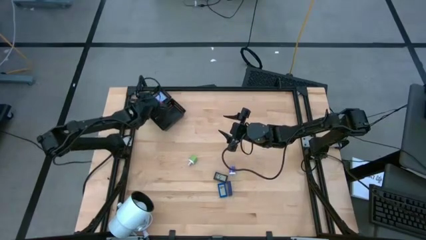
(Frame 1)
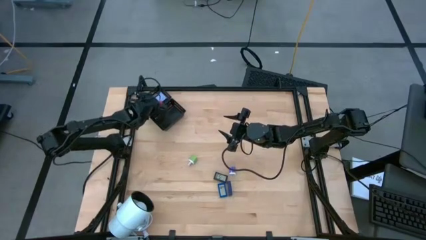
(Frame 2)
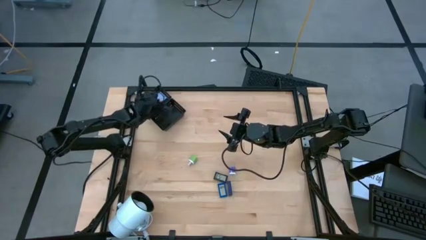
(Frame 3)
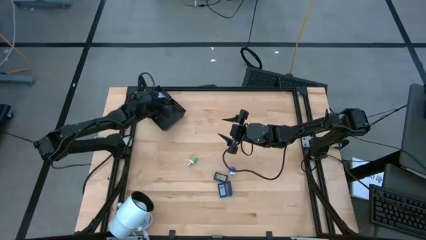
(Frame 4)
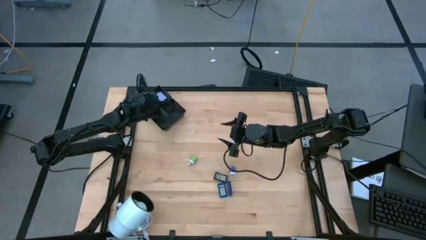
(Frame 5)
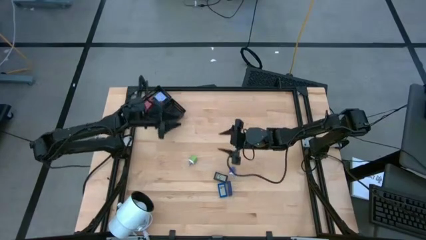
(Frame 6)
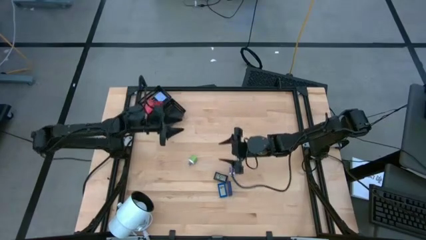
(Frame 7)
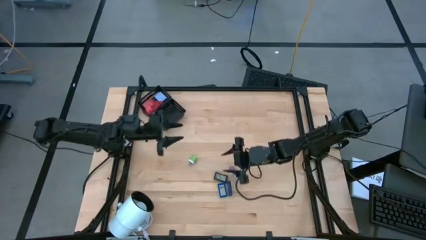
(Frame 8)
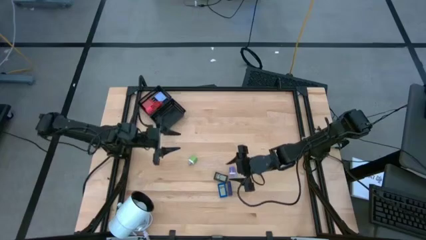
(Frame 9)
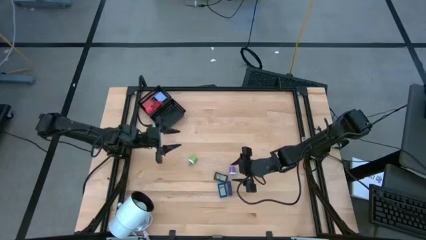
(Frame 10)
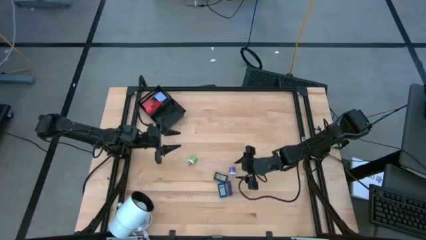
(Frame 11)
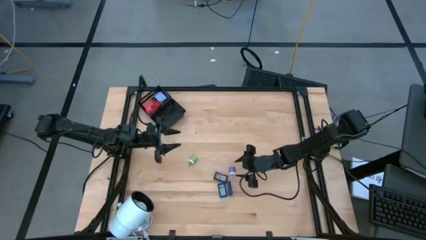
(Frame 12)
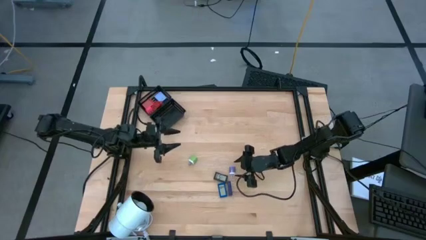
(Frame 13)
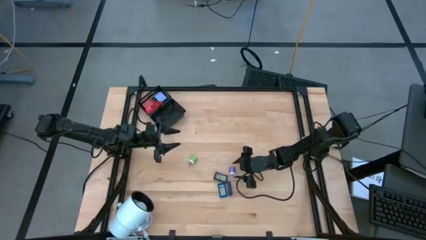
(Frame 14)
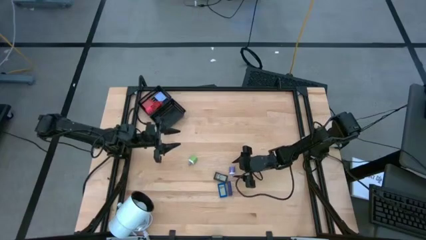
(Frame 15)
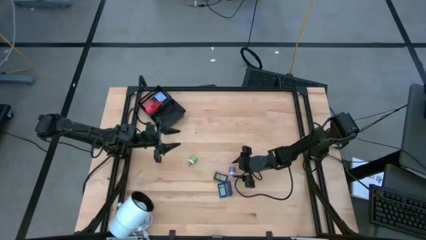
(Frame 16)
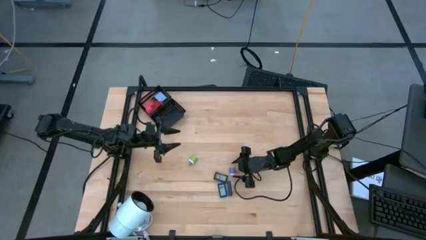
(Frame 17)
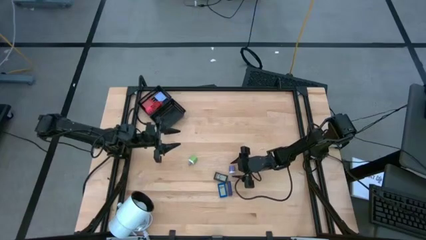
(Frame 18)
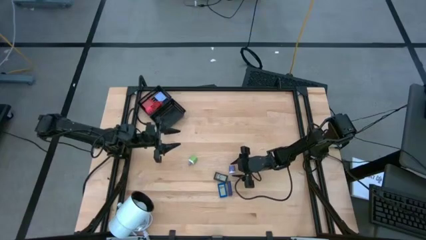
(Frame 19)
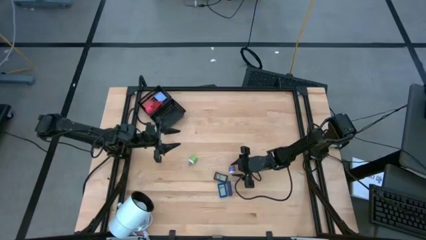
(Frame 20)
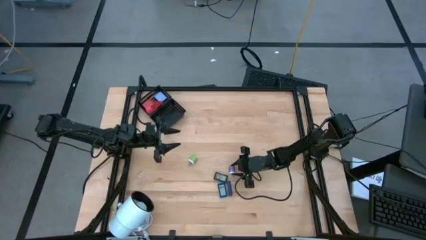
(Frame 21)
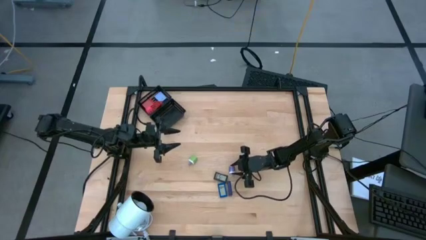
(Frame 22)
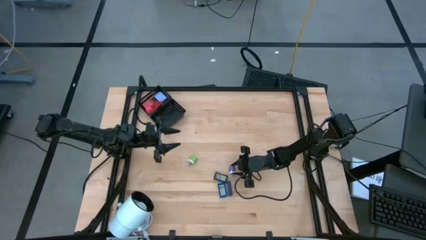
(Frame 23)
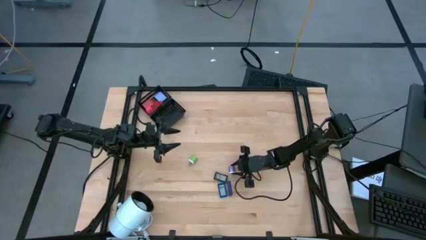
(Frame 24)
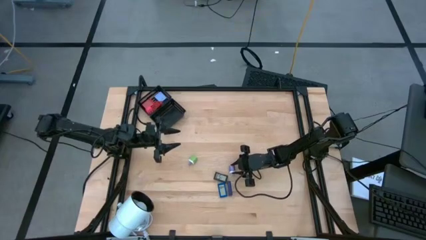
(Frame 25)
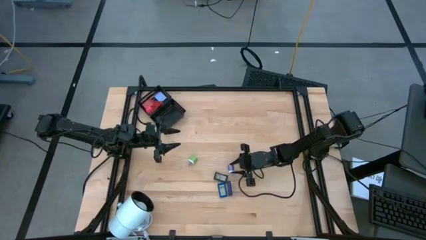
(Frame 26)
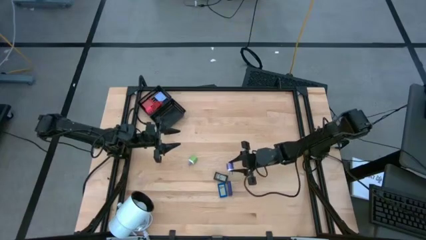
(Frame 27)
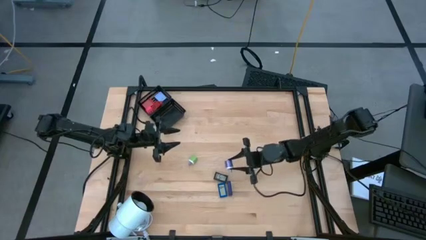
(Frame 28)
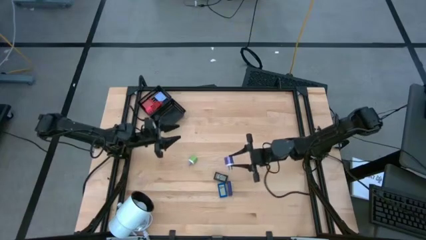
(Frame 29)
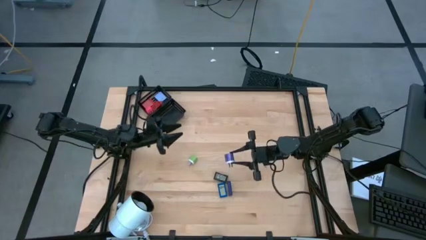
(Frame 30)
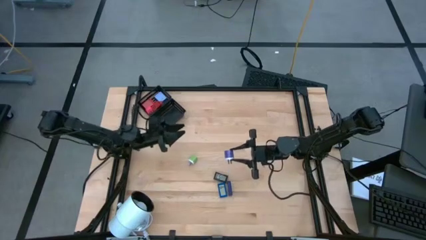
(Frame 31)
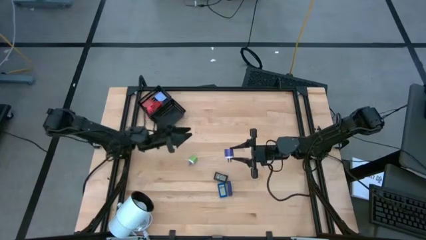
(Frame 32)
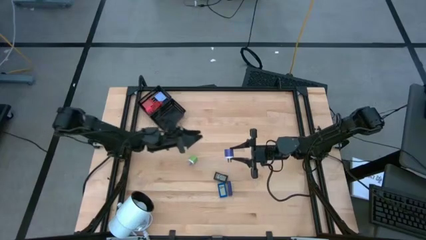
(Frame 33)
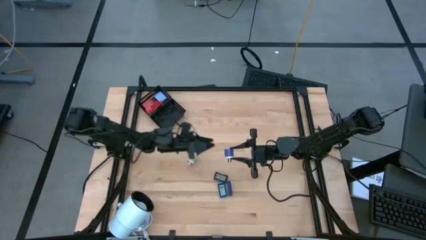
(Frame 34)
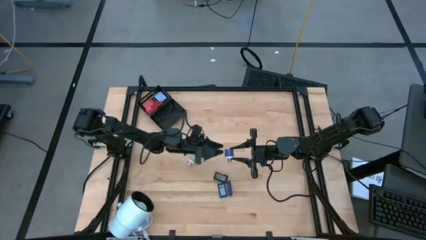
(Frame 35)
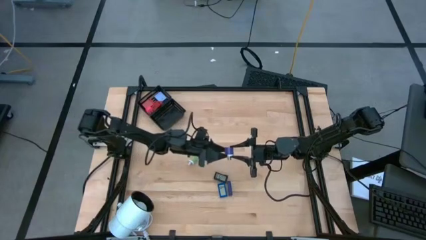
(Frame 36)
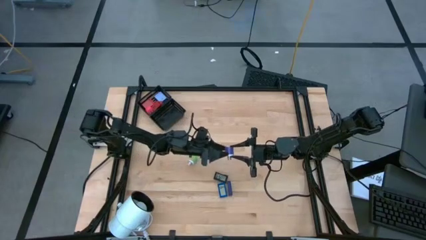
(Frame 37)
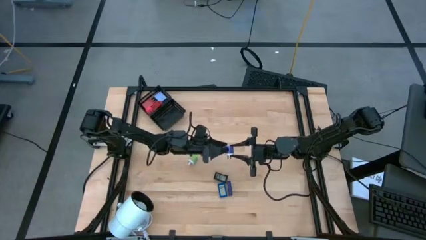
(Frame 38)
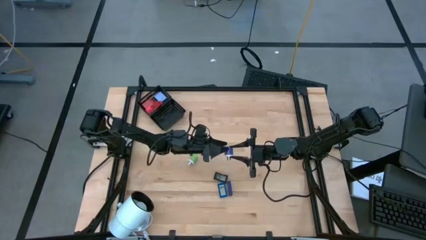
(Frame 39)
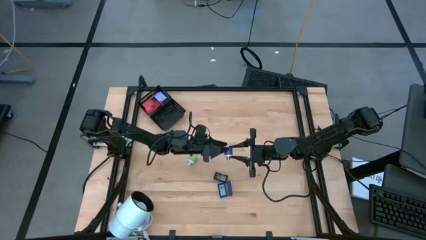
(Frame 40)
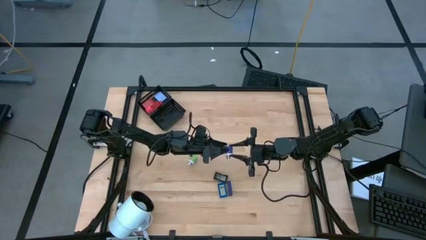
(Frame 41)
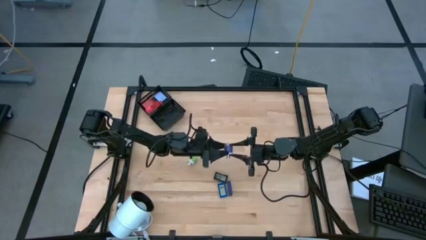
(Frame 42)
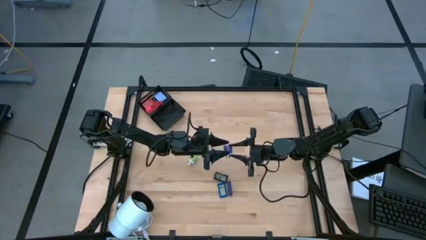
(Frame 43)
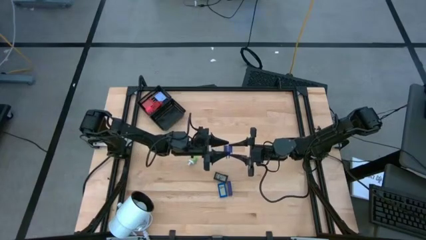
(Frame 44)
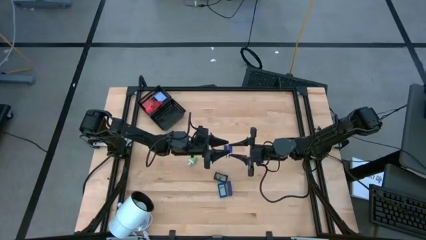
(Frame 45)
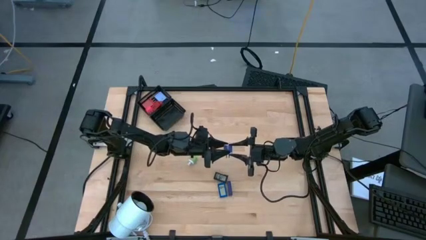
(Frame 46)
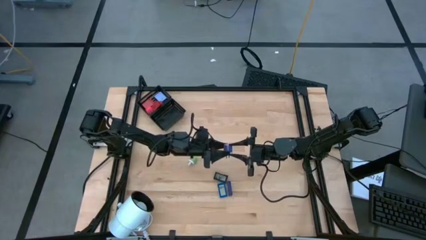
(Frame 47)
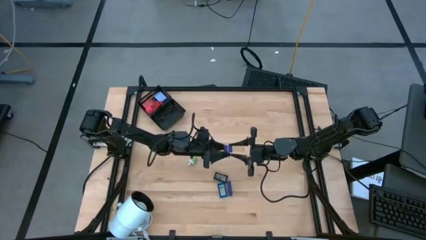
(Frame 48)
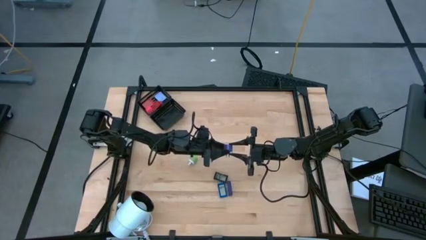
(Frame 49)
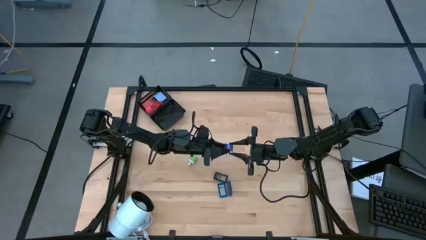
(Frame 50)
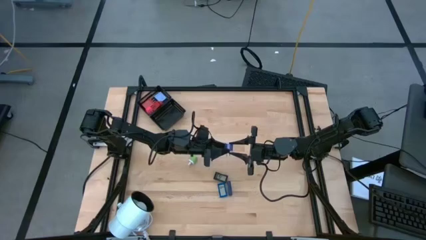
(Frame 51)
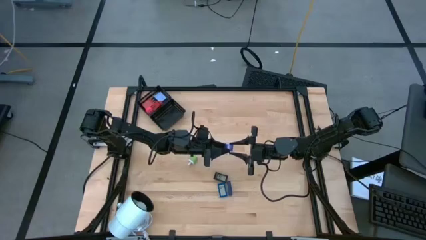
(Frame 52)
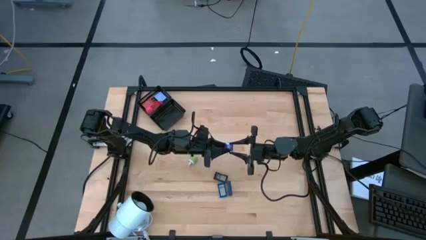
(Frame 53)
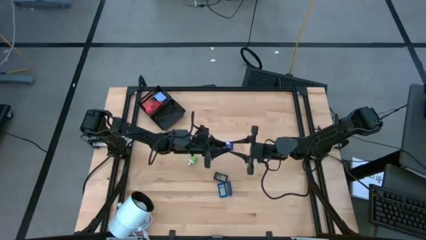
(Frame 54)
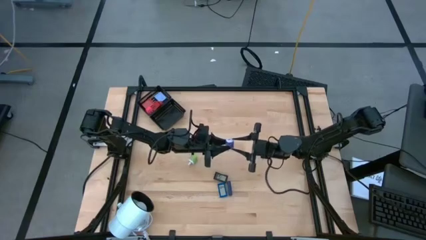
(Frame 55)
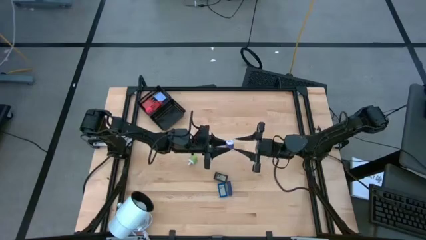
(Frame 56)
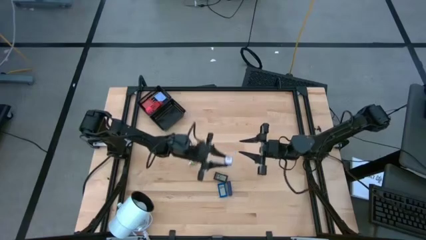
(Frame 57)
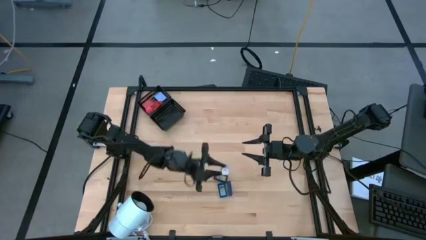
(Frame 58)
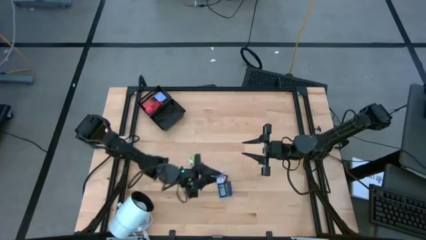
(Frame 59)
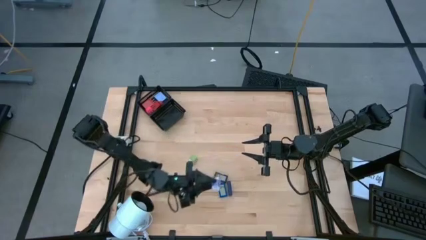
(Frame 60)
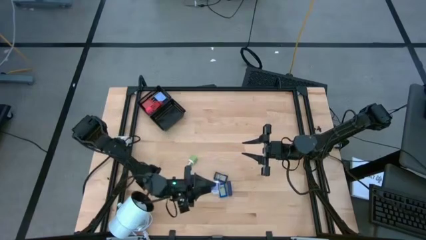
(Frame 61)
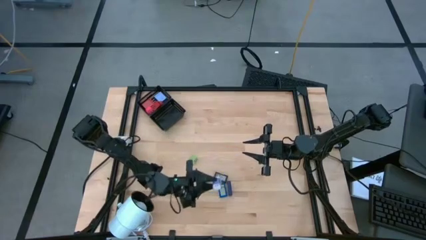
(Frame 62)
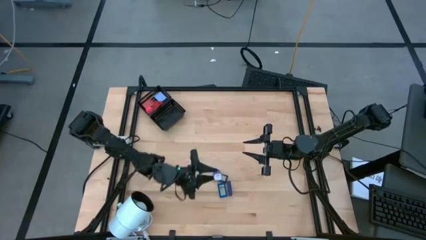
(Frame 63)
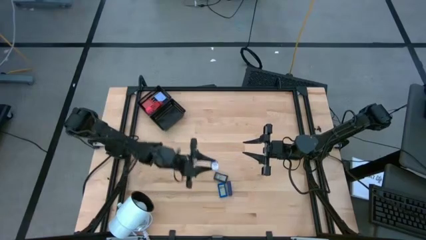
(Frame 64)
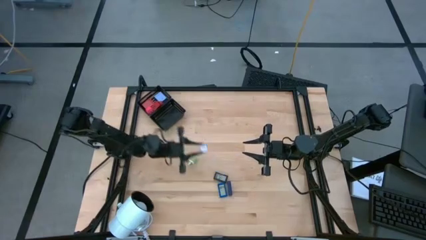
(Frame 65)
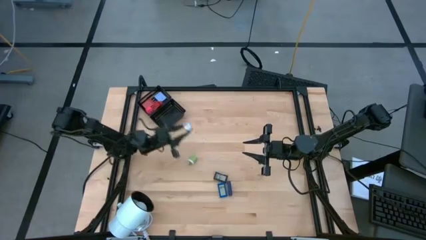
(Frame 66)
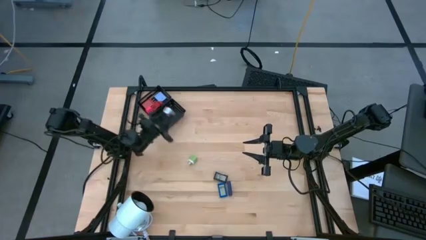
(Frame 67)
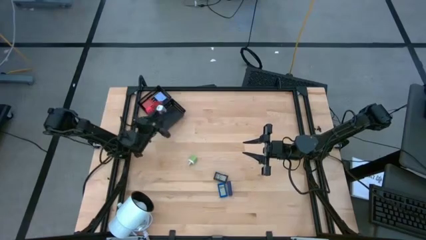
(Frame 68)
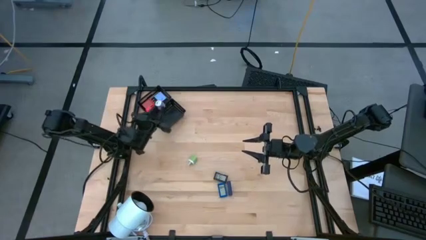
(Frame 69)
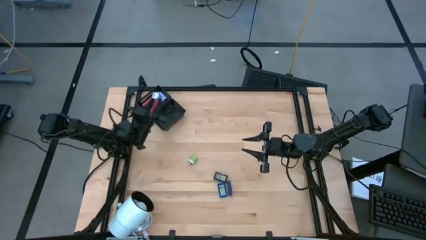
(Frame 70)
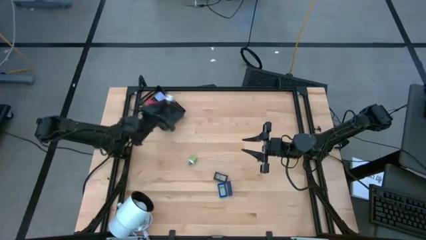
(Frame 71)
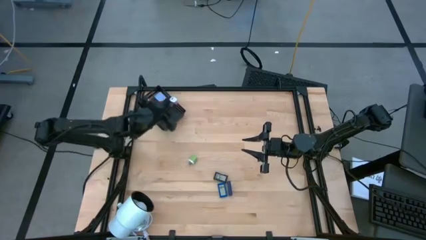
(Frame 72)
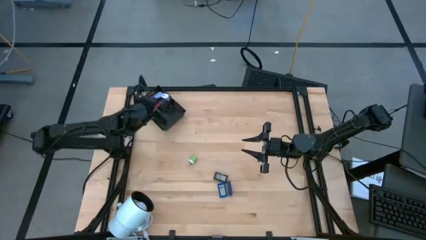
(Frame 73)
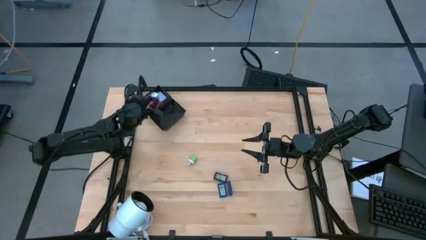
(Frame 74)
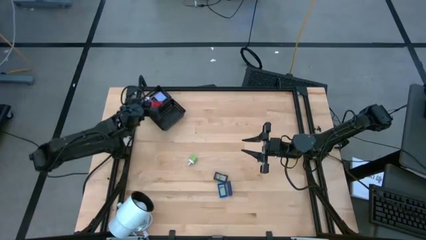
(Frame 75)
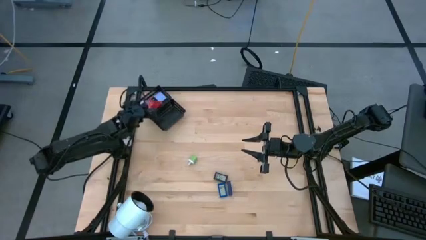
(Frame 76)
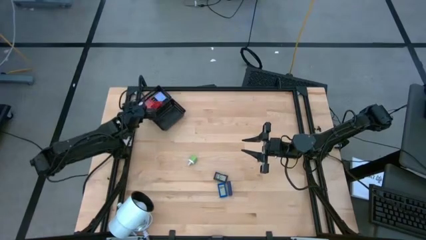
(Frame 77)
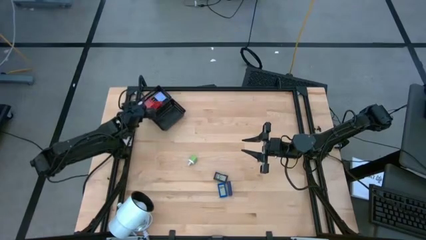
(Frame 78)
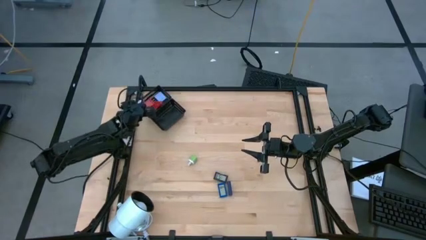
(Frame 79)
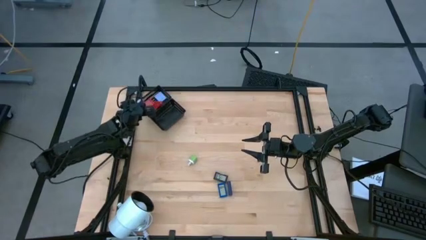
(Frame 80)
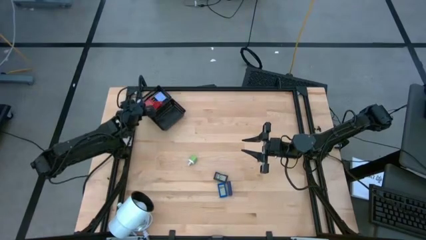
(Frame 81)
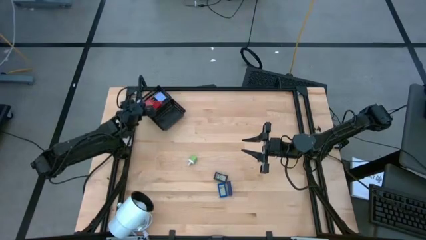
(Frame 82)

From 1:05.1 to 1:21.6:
Task: Pick & Place Office items
Put the purple charger adapter into the top black bin
